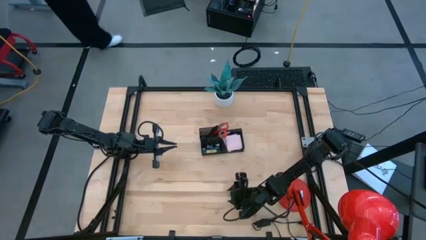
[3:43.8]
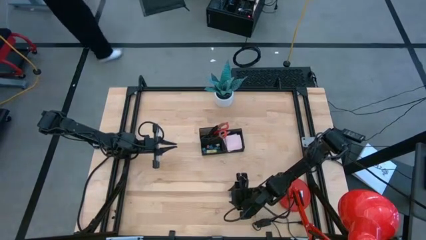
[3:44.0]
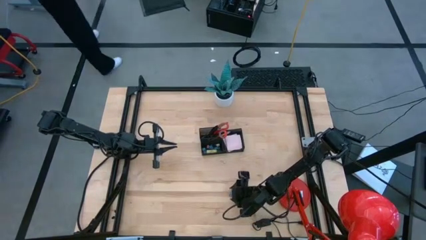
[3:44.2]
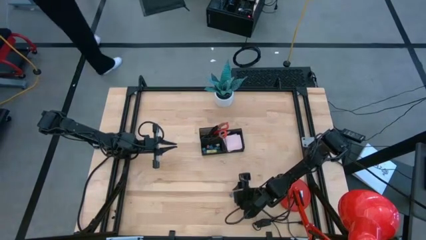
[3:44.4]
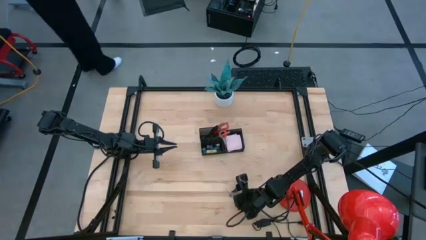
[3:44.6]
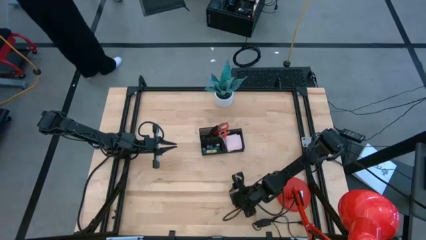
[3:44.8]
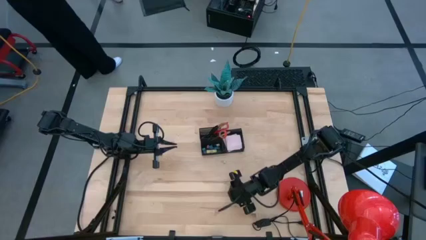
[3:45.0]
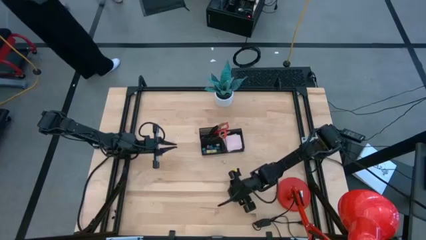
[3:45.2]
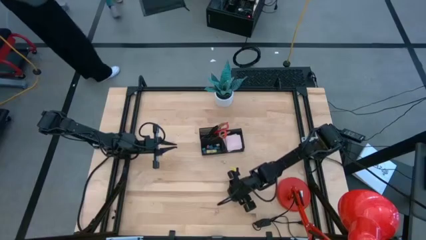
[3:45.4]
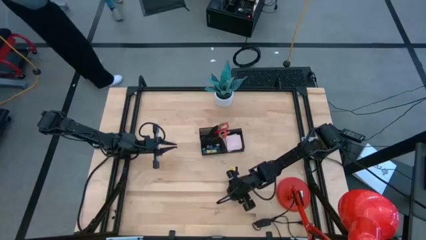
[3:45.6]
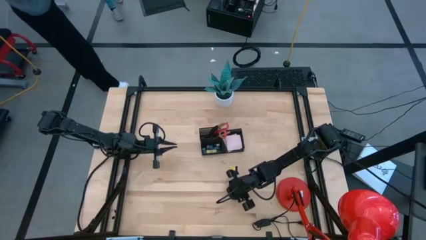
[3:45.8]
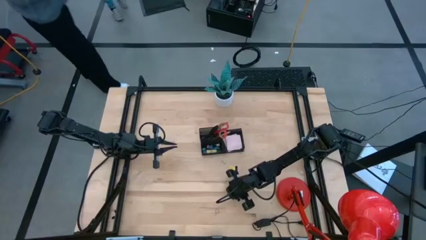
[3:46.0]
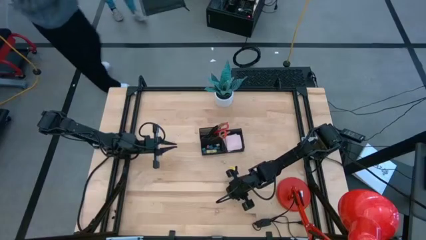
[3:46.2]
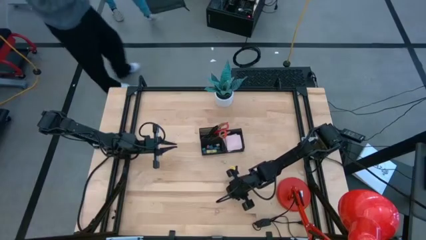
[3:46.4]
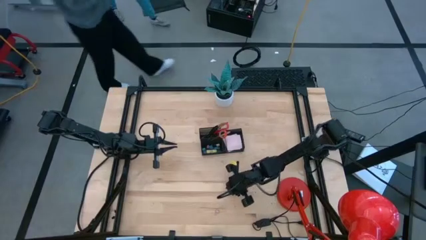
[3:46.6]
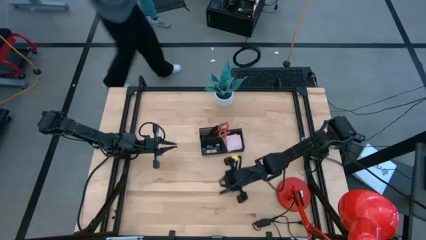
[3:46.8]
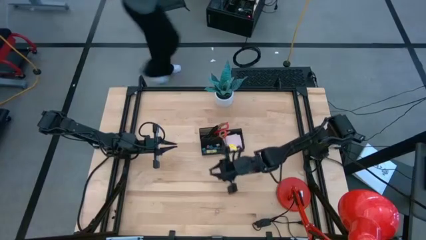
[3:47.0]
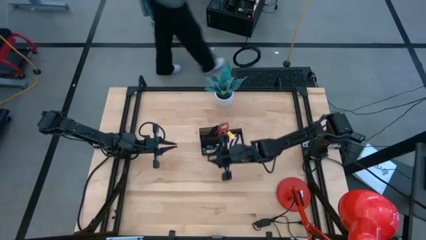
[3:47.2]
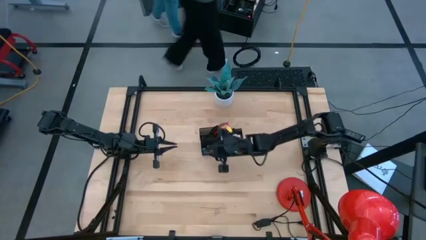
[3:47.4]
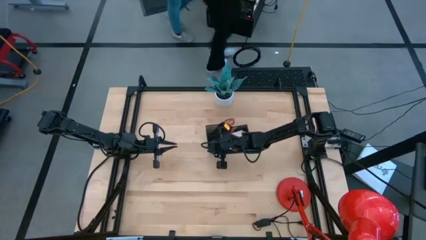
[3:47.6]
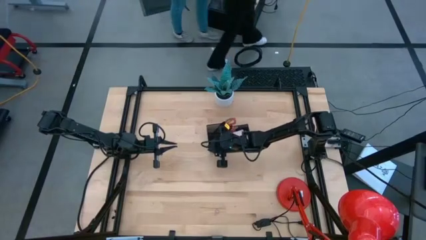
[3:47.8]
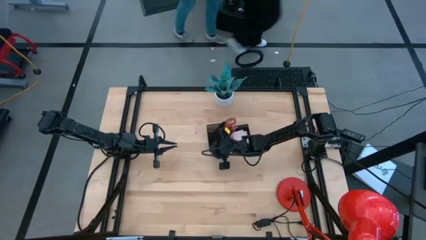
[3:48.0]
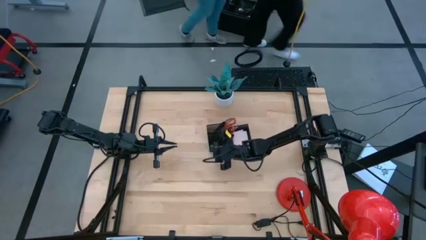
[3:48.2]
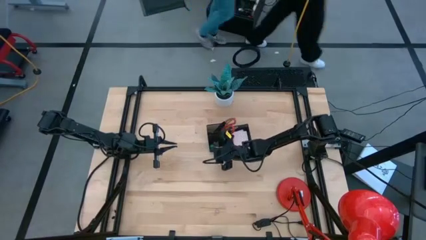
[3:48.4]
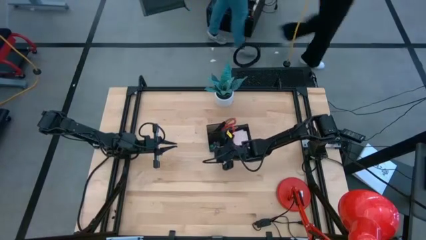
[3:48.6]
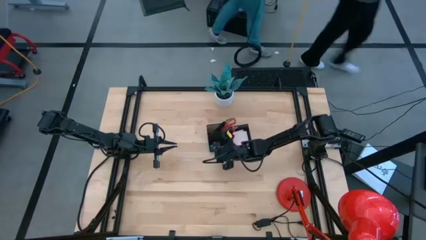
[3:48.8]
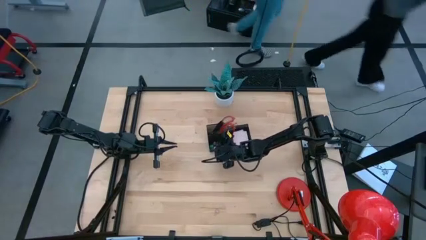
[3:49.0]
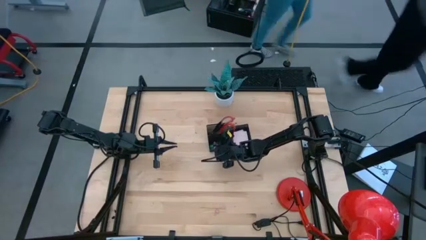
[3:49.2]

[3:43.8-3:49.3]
Task: Pick and place office supplies into organizer
Put the blue binder clip into the black desk organizer

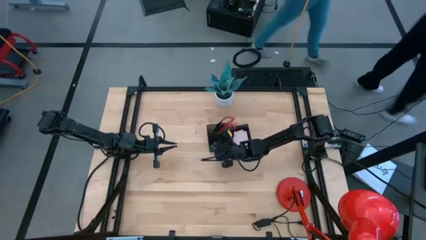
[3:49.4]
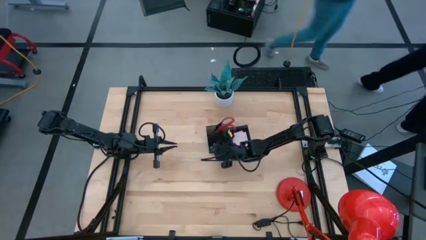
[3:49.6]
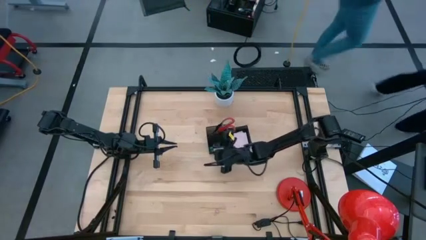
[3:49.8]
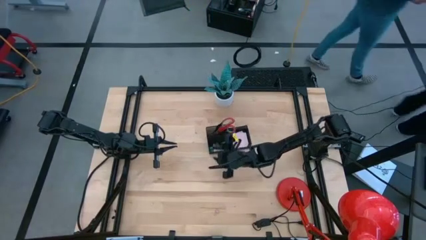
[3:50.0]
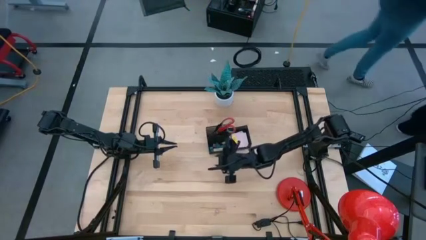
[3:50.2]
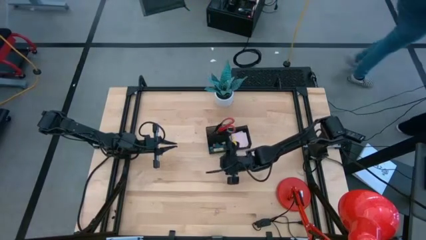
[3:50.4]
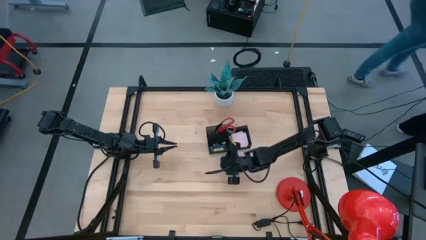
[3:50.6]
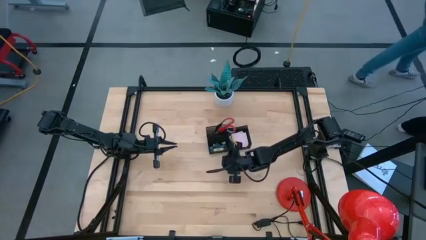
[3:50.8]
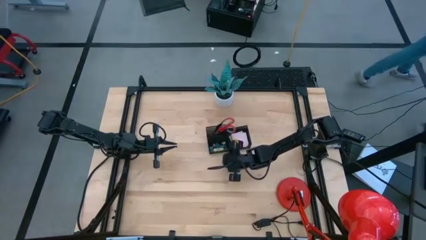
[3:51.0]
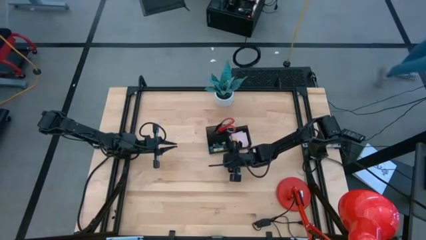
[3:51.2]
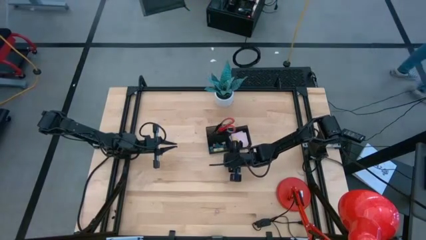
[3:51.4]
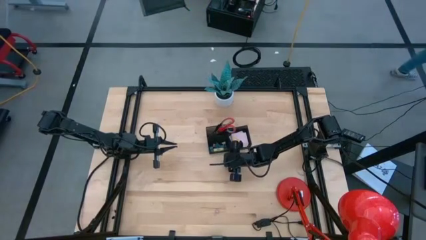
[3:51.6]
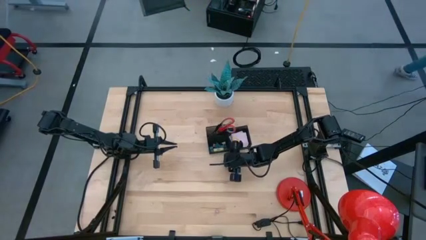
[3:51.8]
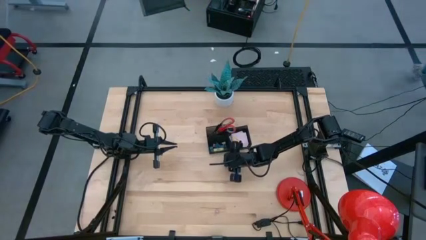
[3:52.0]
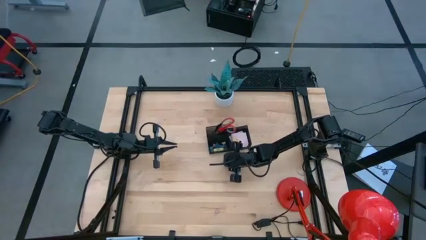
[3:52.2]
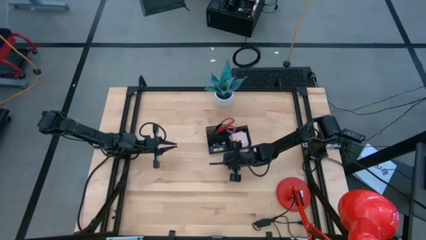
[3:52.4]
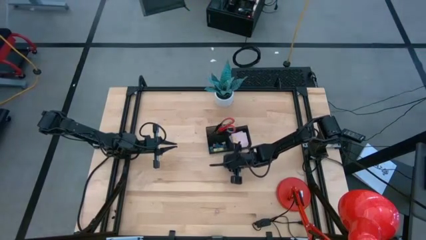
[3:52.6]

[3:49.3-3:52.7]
Put the green binder clip into the black desk organizer

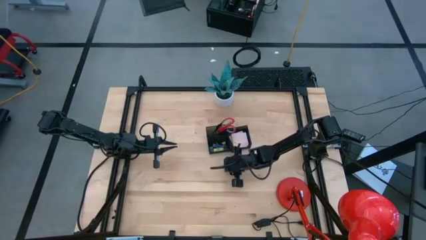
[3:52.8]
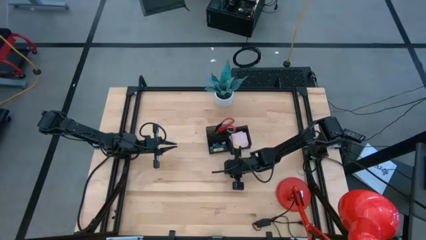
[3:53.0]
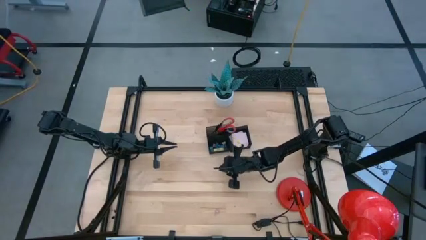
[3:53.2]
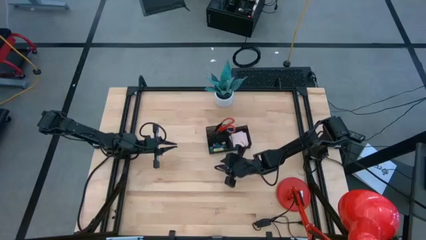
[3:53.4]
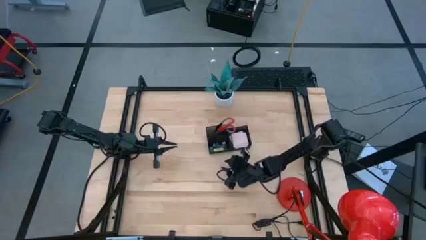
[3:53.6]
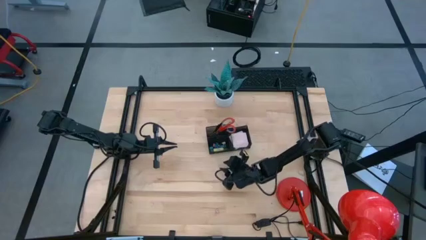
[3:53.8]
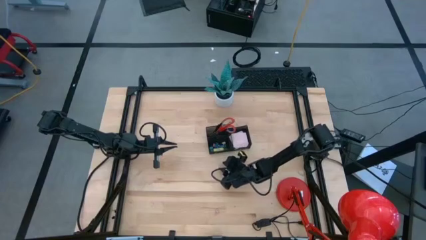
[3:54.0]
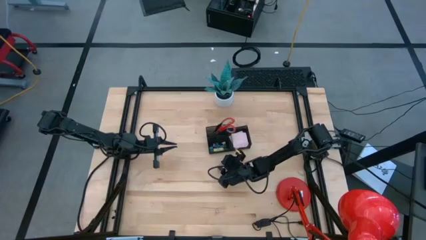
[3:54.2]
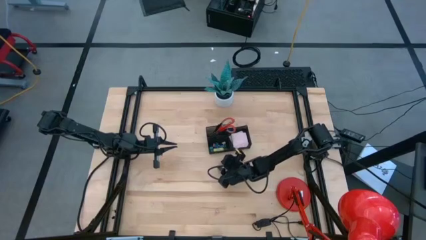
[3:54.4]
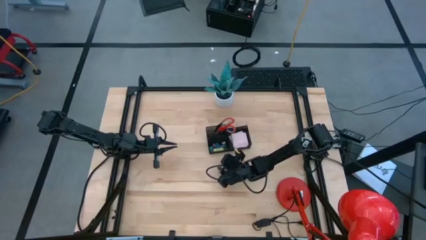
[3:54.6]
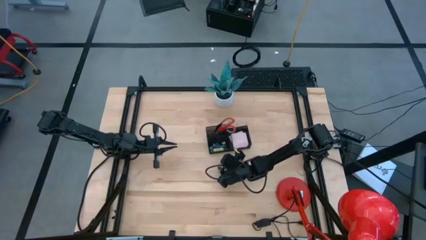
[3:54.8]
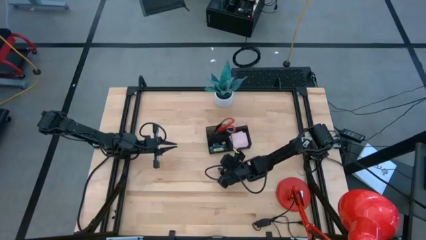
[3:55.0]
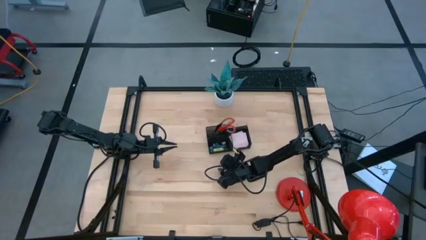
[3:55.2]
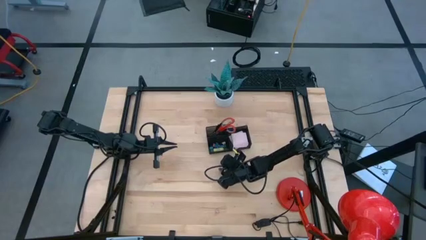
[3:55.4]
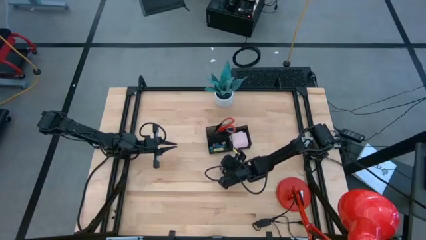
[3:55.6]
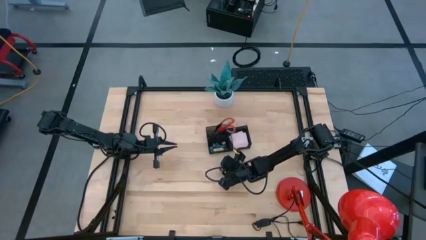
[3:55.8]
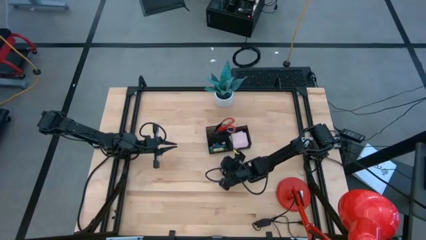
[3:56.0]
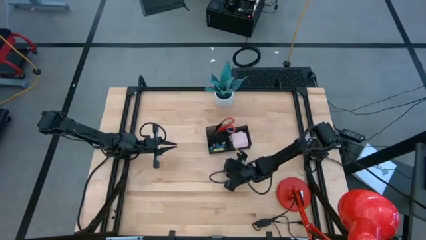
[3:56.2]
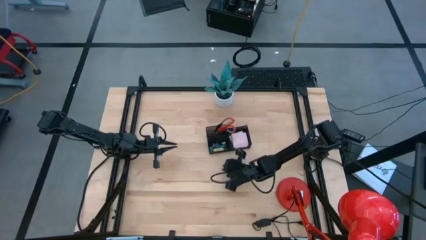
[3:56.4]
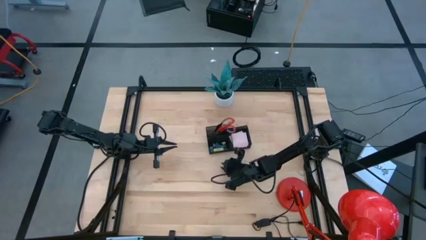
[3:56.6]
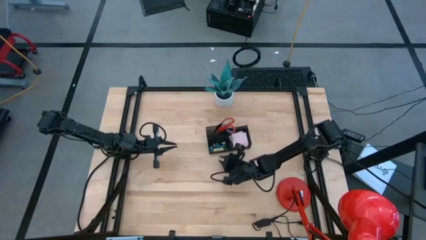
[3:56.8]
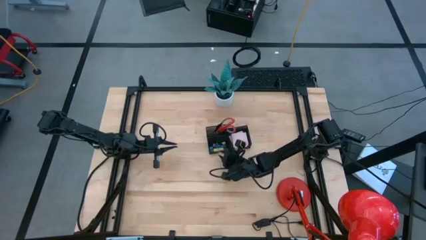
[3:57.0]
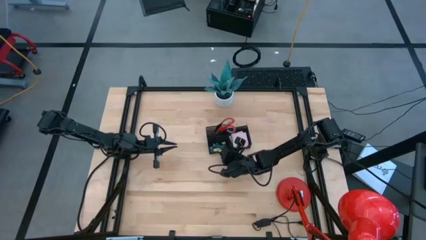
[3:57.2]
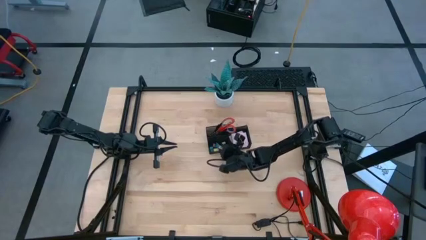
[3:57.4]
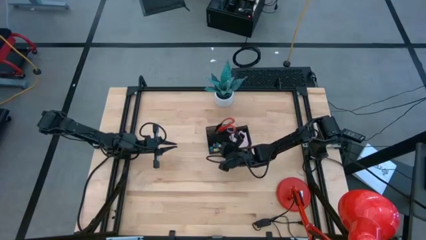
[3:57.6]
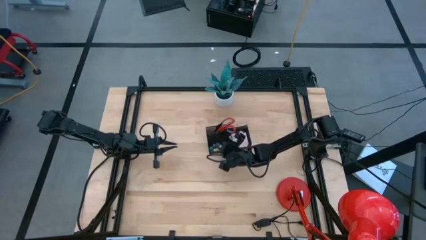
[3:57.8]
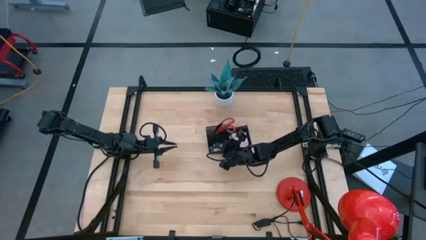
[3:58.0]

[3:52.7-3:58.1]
Put the yellow binder clip into the black desk organizer

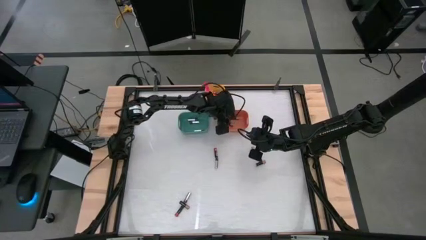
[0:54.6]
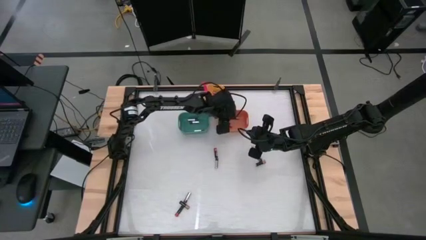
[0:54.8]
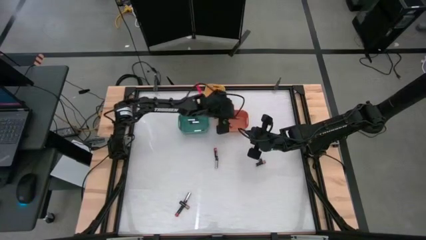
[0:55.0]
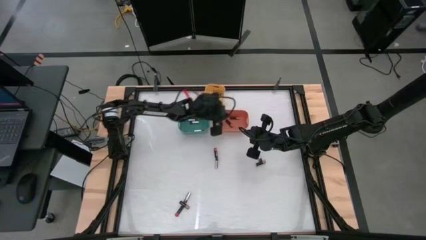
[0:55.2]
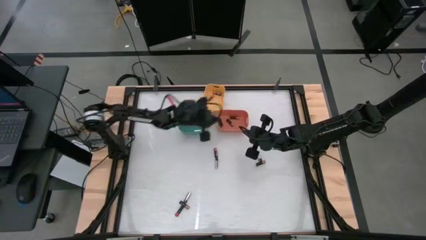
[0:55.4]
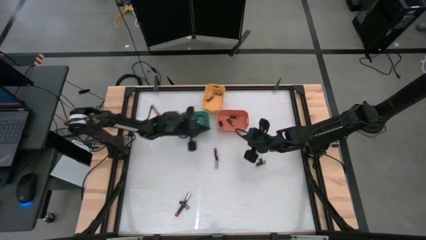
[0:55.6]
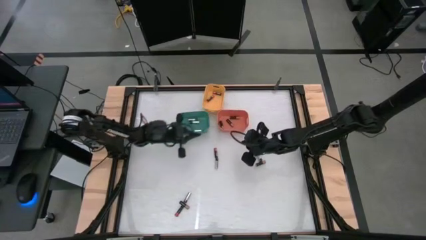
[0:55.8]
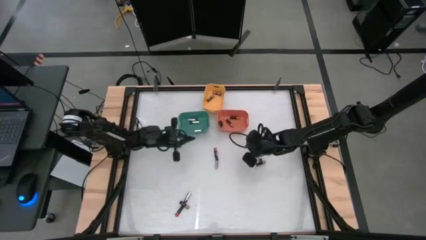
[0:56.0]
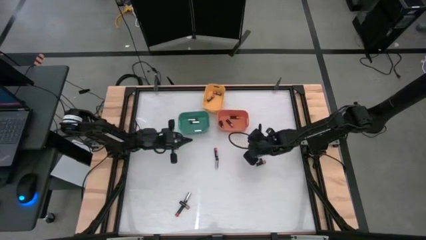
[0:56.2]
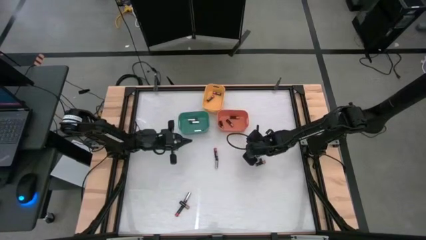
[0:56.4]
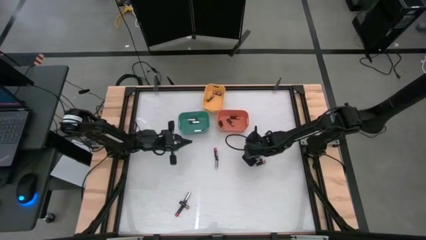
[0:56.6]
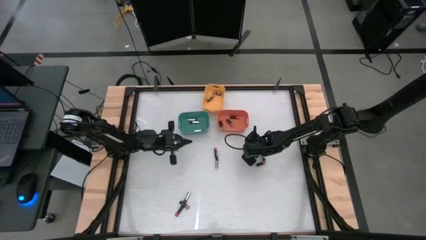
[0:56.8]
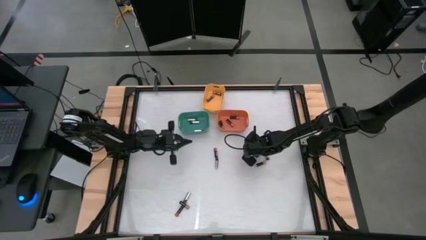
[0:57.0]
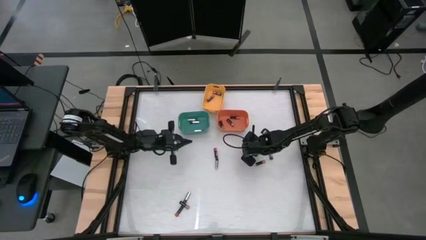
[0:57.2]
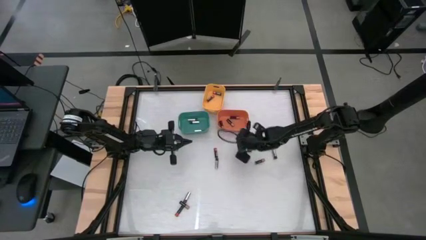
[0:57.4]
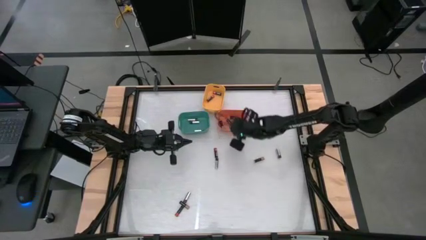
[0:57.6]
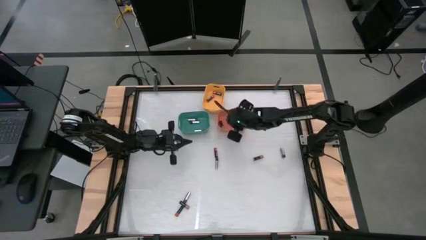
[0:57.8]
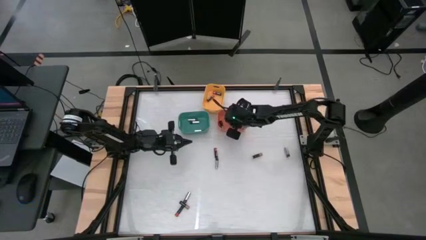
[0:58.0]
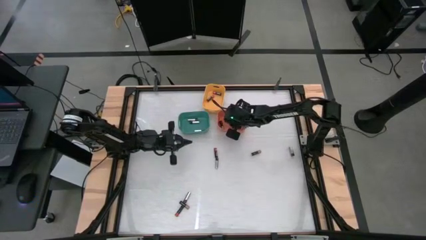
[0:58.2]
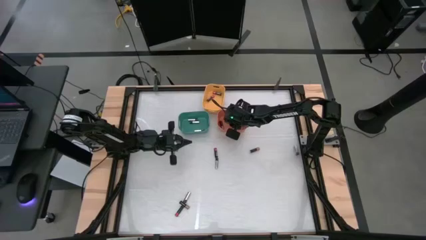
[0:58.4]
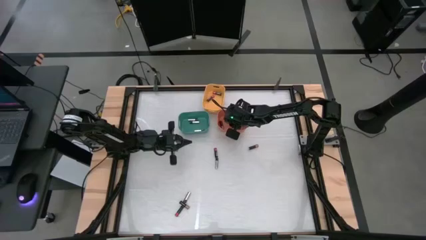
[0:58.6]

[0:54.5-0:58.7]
Task: Sort batteries
Put the brown battery into the orange bin
